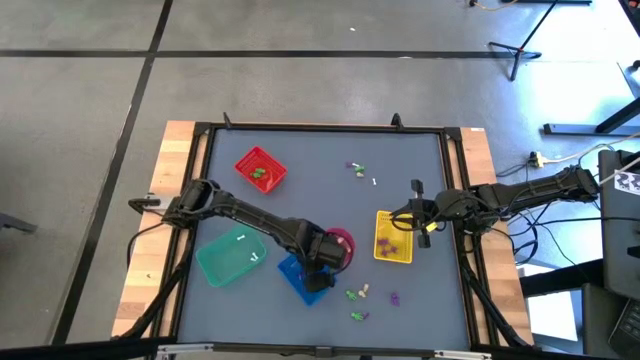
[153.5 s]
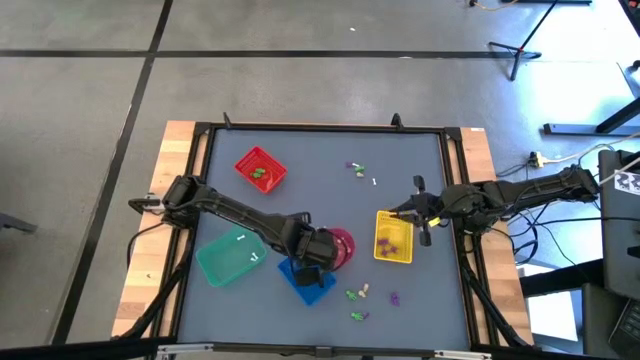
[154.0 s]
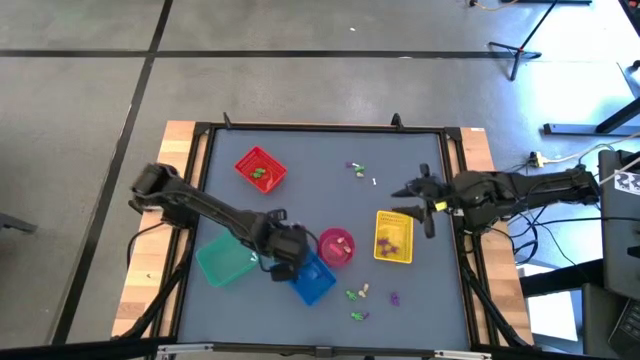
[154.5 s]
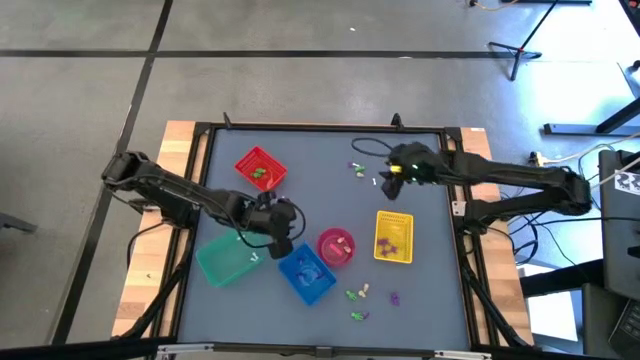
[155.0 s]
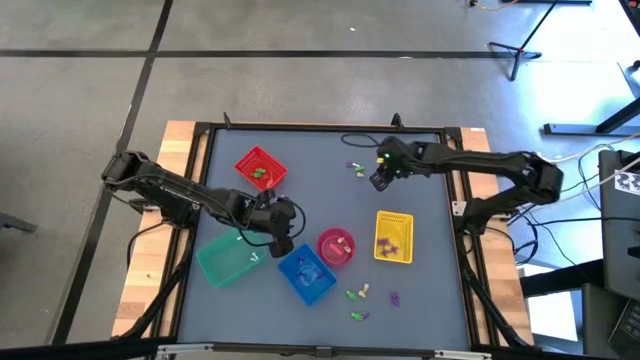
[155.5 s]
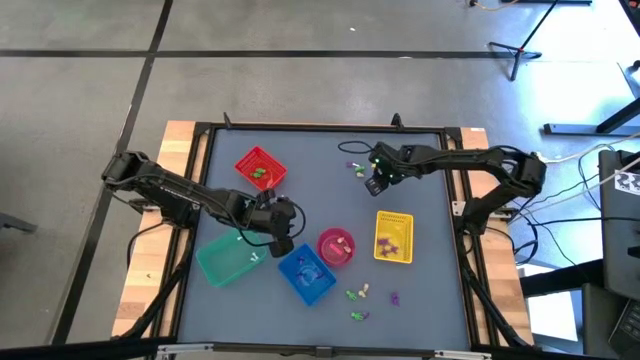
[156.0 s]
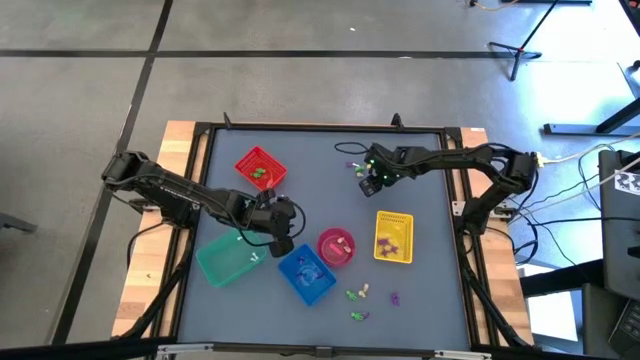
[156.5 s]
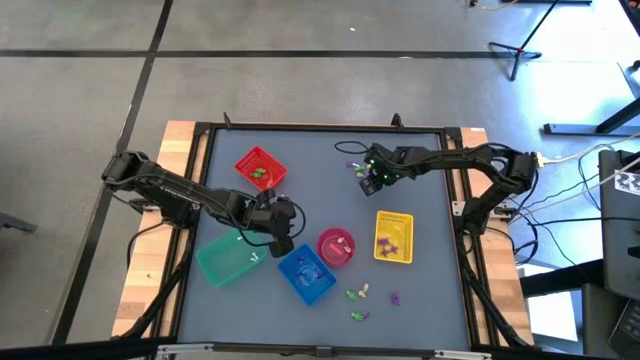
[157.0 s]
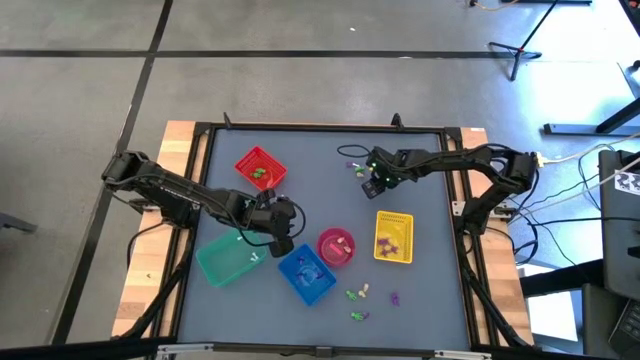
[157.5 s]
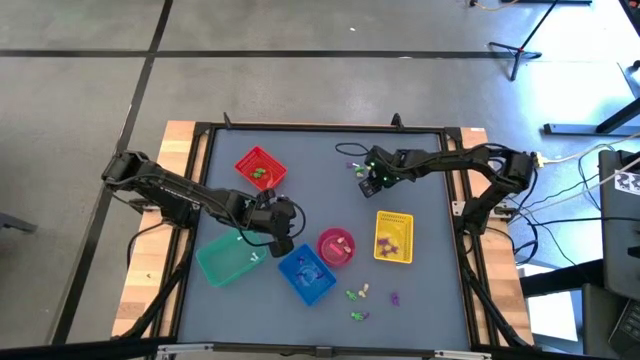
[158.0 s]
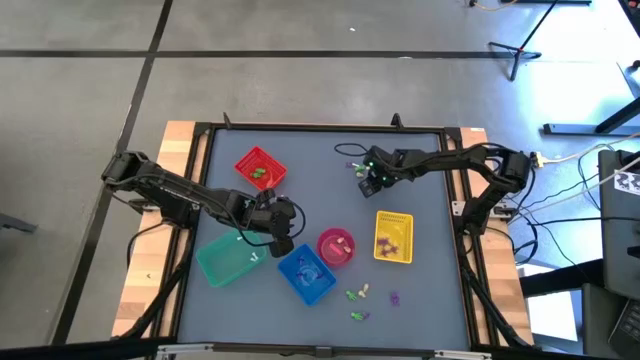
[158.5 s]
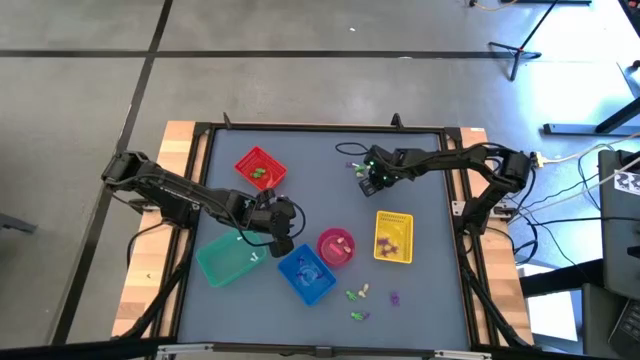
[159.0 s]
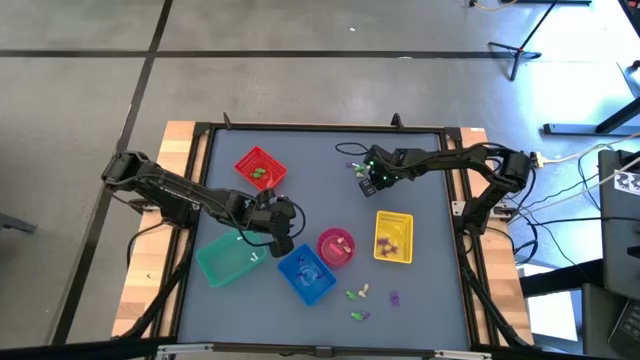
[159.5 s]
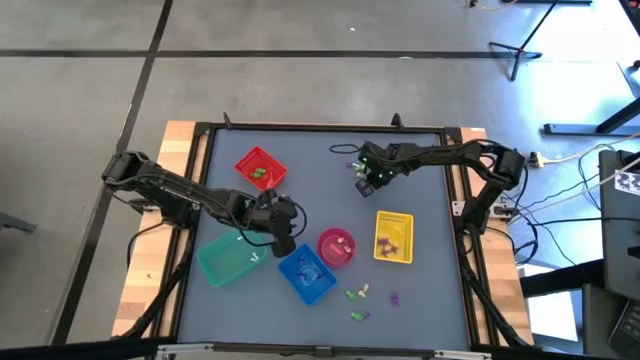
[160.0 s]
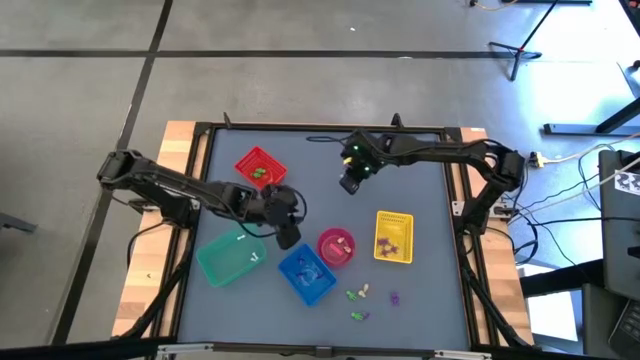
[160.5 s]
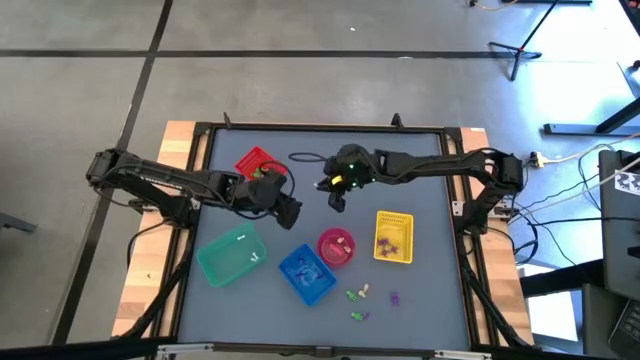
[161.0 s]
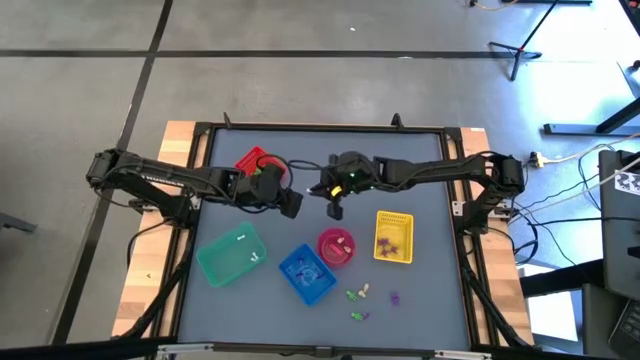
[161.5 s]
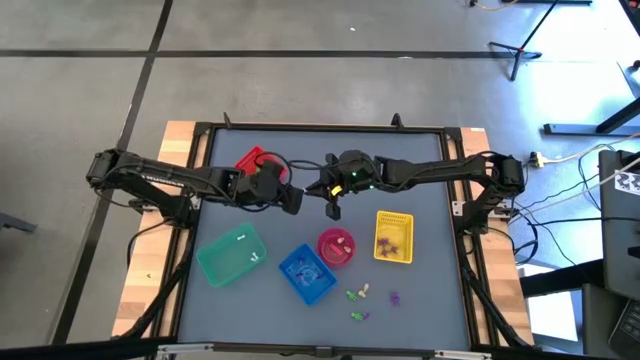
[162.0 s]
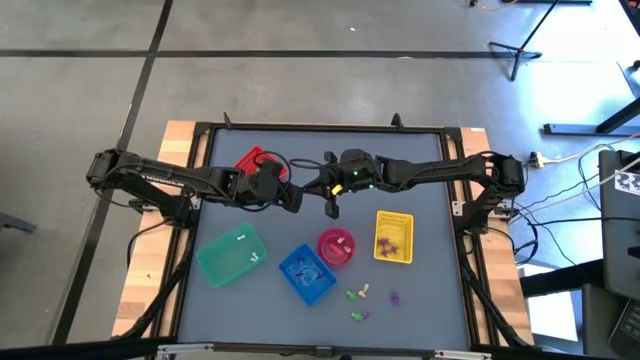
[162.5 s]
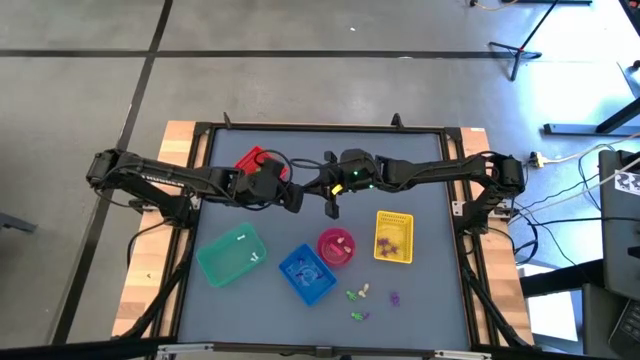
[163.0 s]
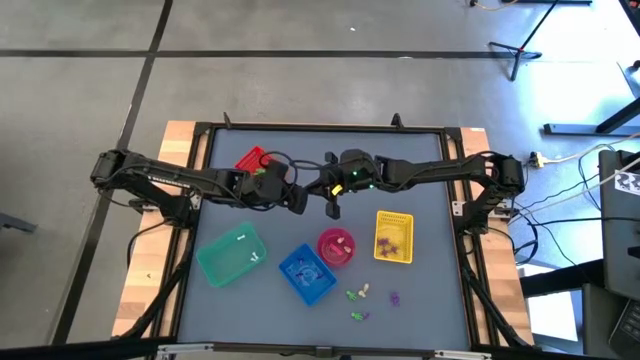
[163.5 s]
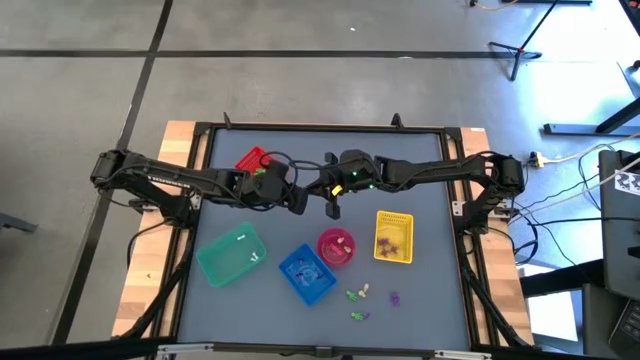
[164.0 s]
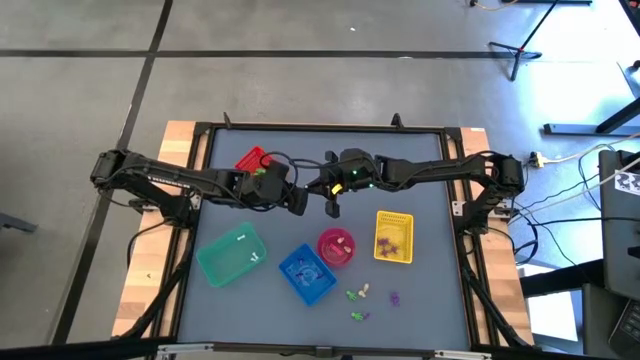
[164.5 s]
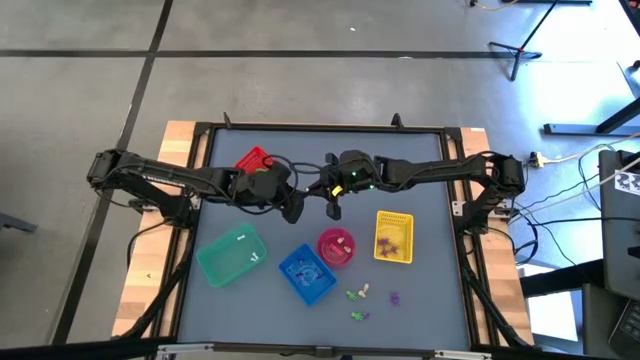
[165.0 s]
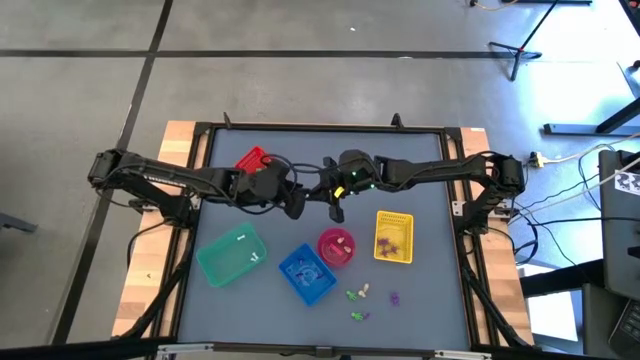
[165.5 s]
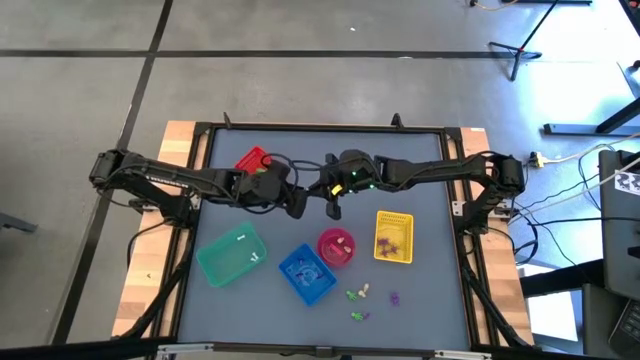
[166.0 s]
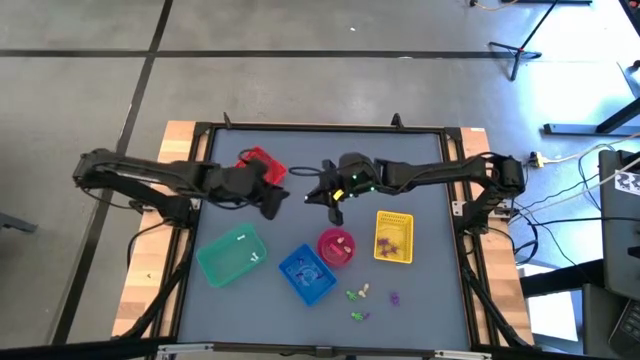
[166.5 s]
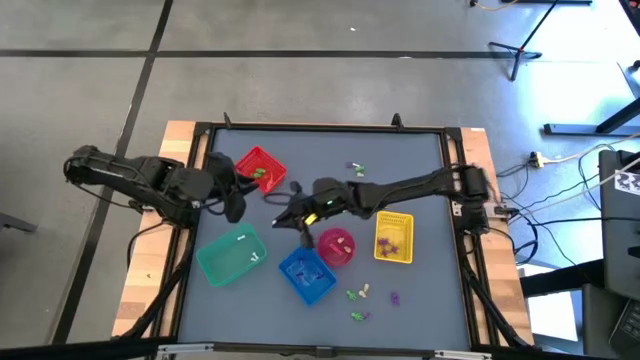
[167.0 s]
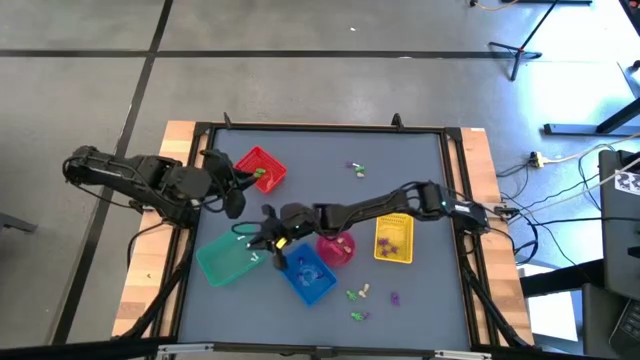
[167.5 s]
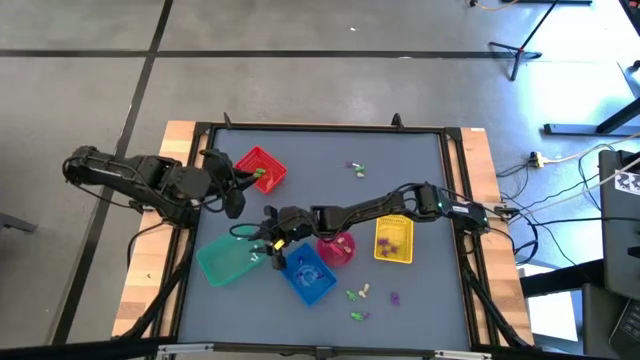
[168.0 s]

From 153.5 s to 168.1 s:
Task: Sort Halloween decoration
Put the white bone toy into the green bin

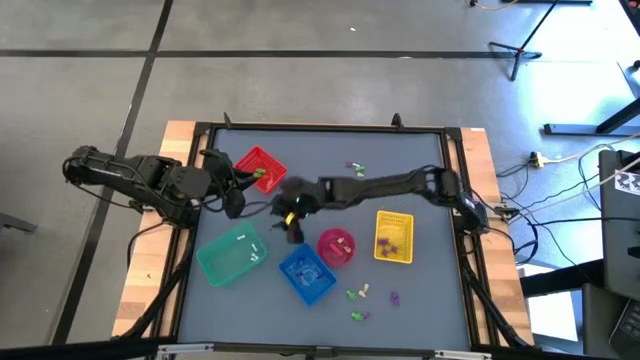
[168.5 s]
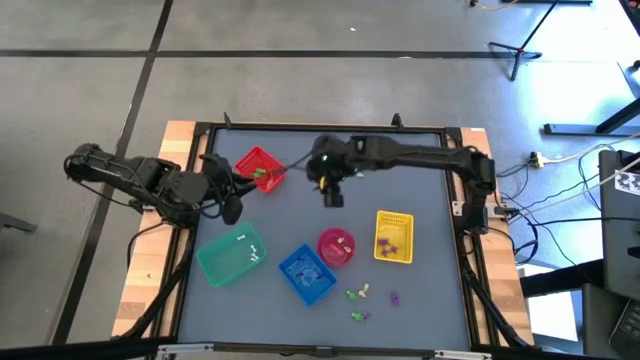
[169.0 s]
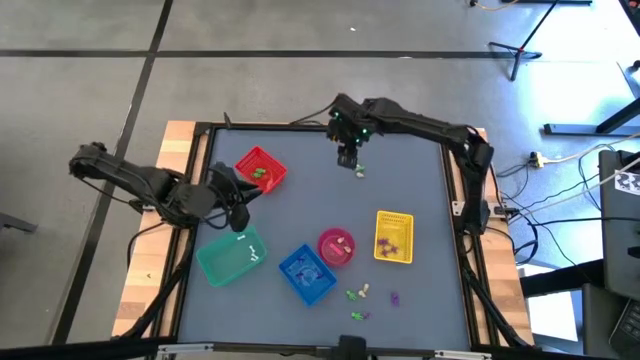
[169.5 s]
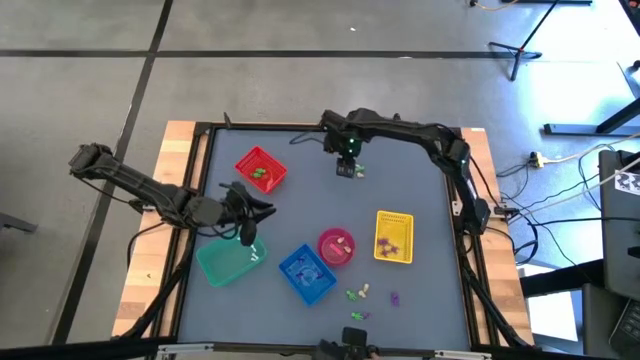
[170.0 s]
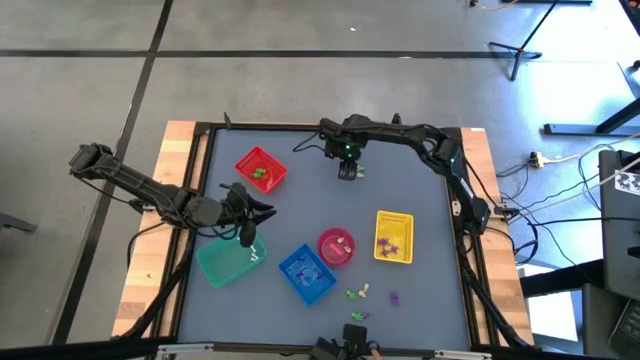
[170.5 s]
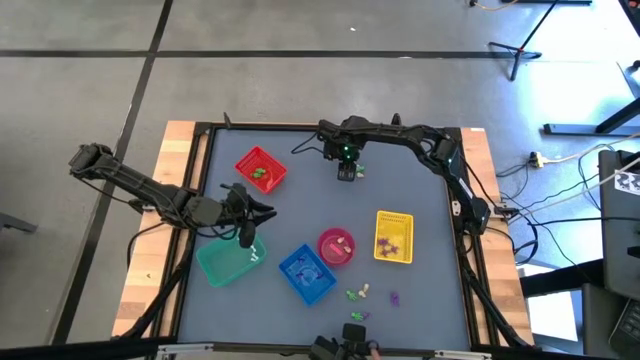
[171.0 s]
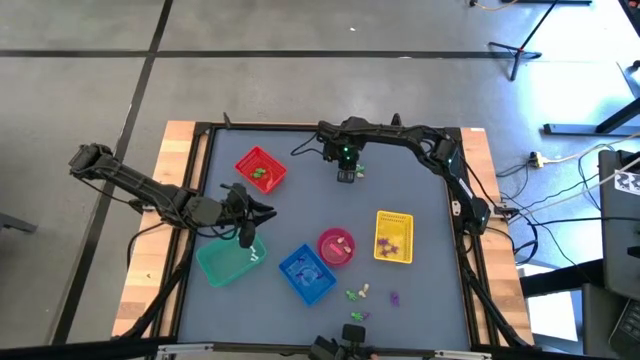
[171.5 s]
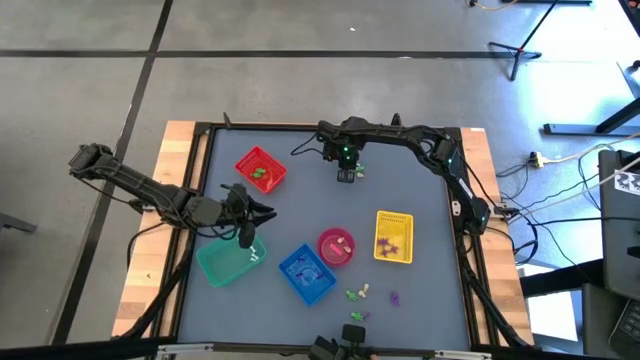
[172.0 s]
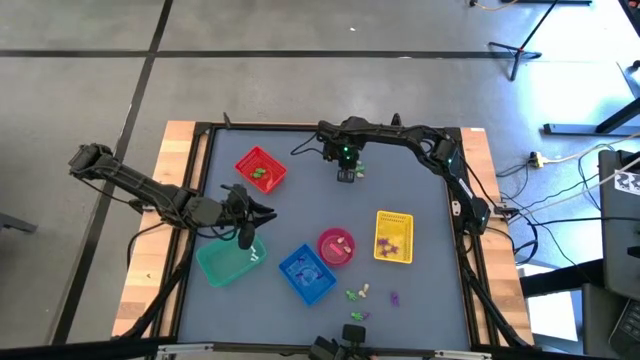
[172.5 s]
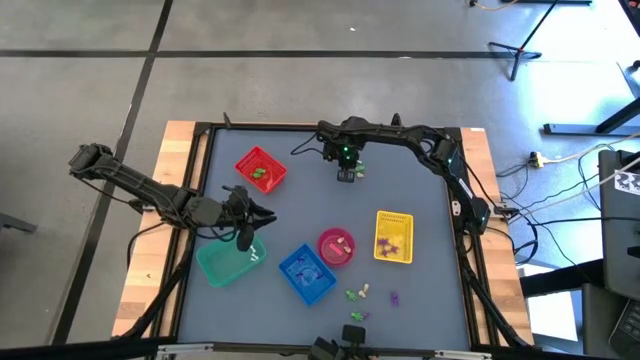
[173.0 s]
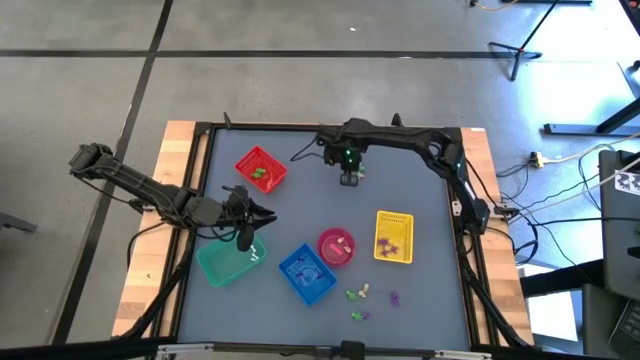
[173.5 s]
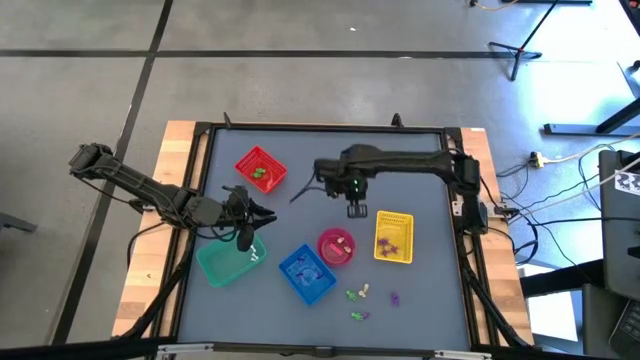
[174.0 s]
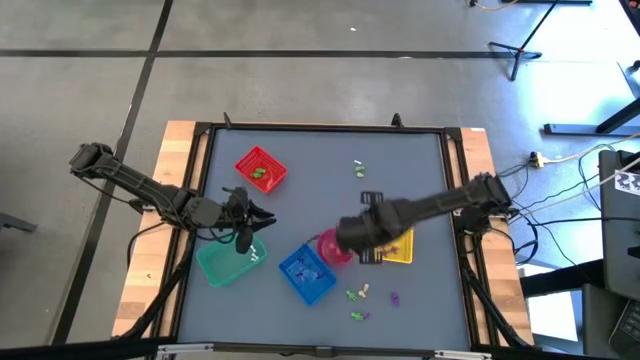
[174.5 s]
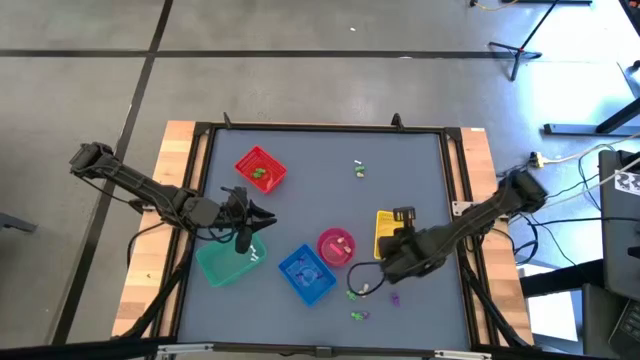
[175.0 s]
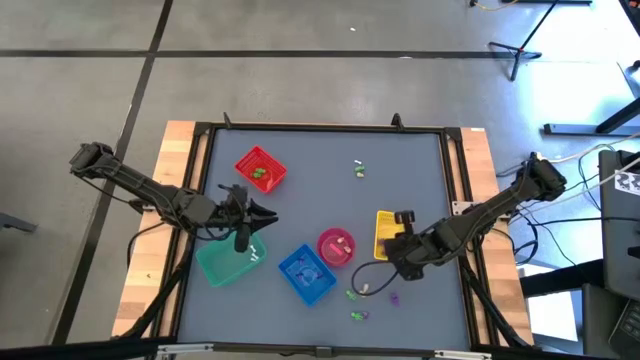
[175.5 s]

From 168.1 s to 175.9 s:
Put the violet spider toy into the yellow bin
